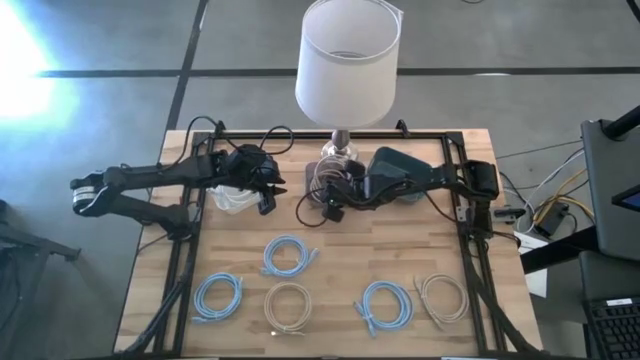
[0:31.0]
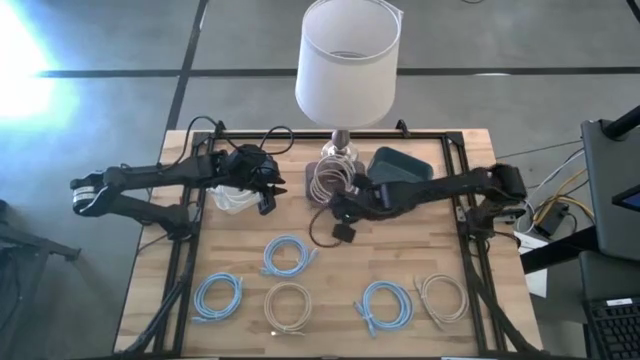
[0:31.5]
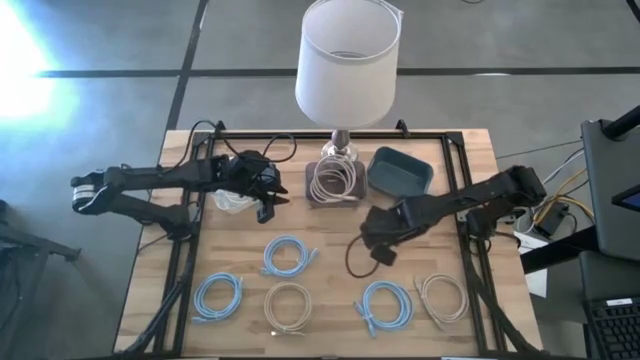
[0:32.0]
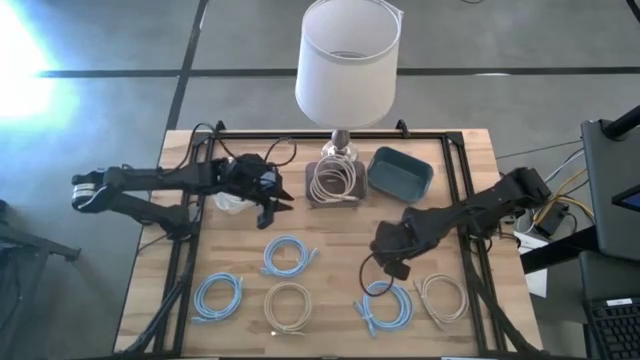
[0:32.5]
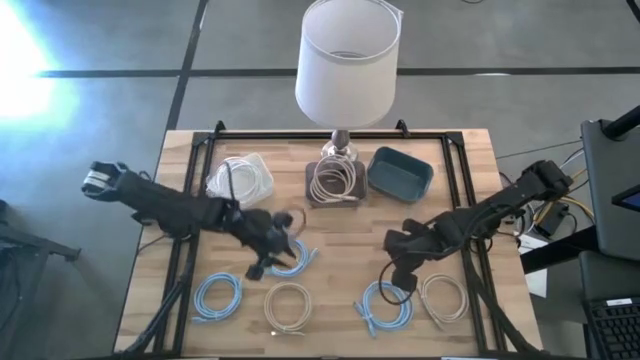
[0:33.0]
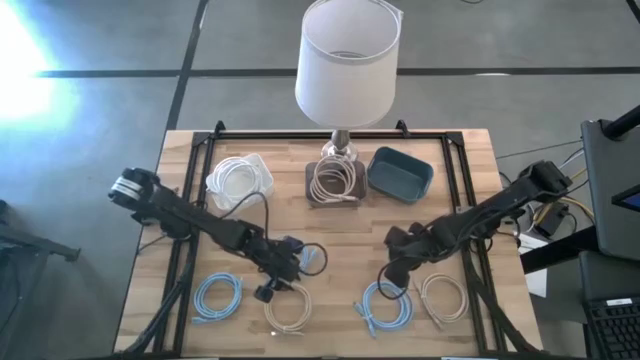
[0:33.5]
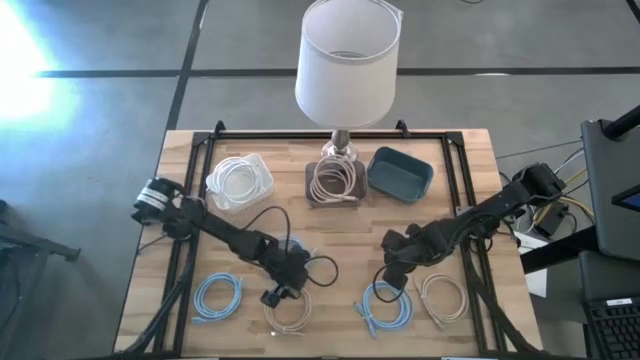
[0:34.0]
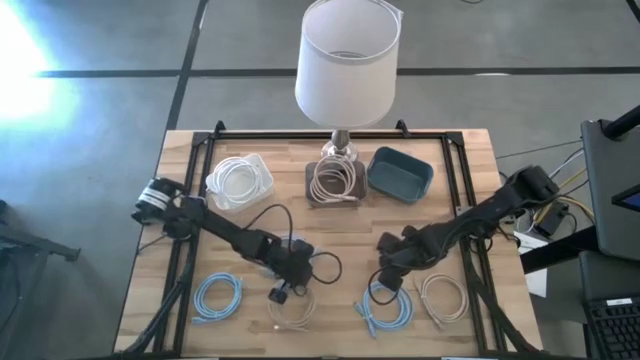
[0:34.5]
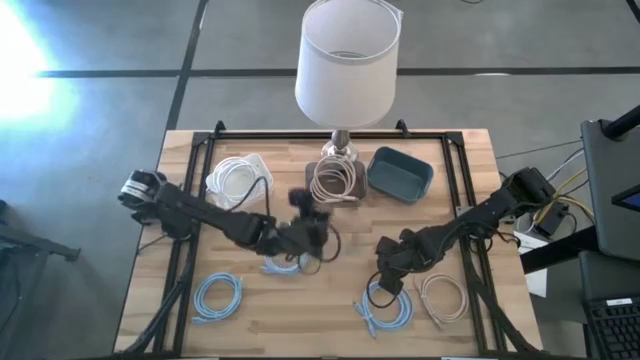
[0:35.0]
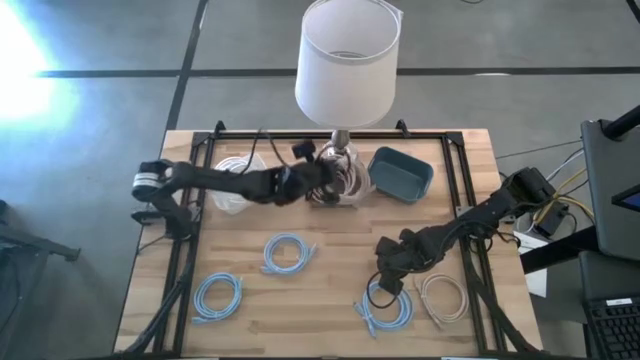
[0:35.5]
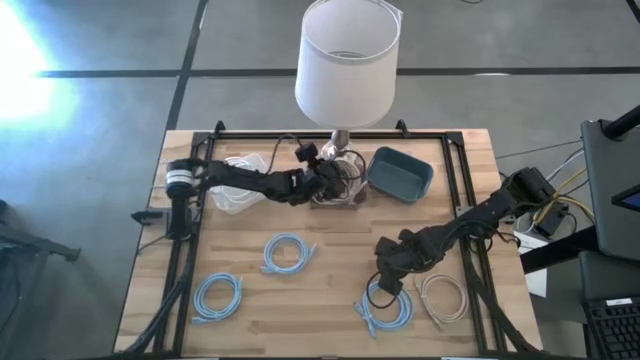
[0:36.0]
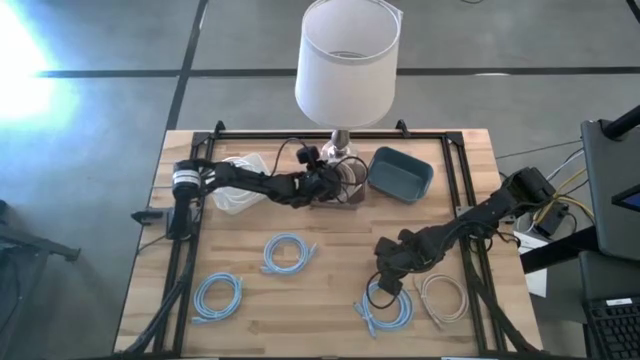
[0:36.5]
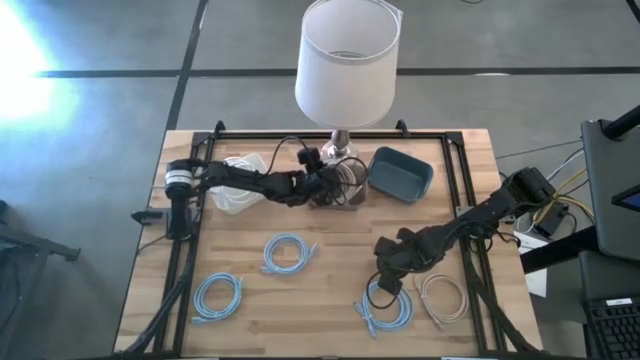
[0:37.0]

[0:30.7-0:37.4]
Task: Sort HDMI cables
Put the left brown HDMI cable into the black bin

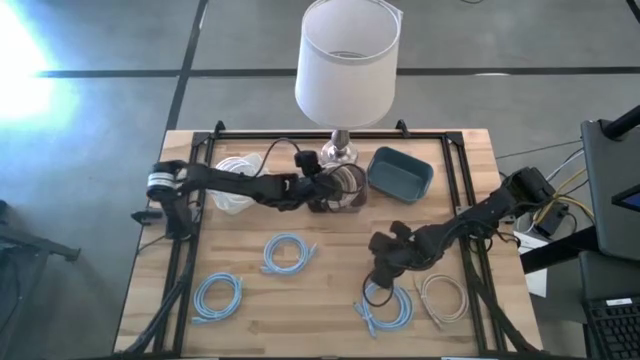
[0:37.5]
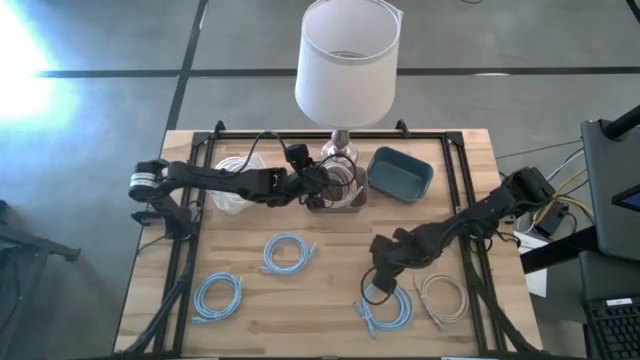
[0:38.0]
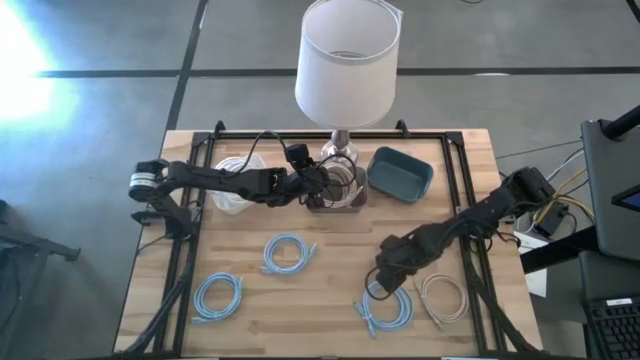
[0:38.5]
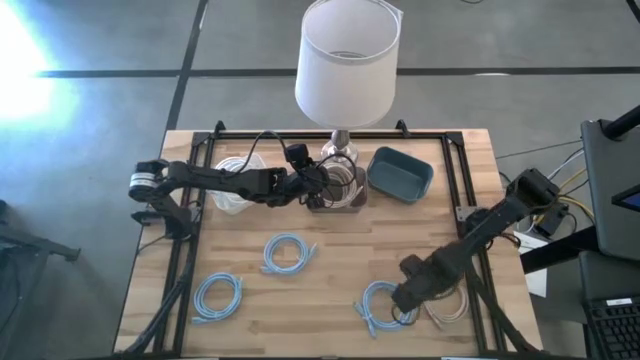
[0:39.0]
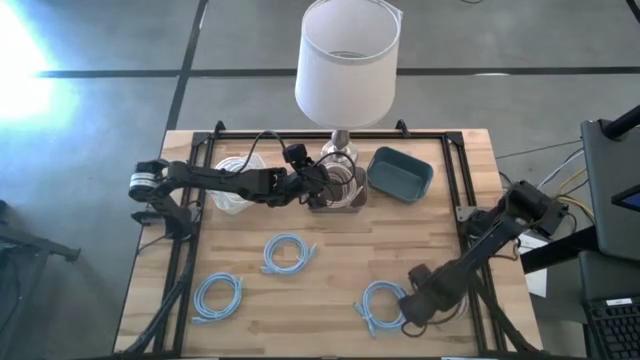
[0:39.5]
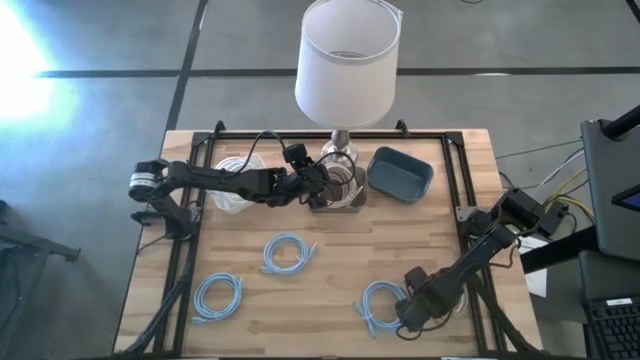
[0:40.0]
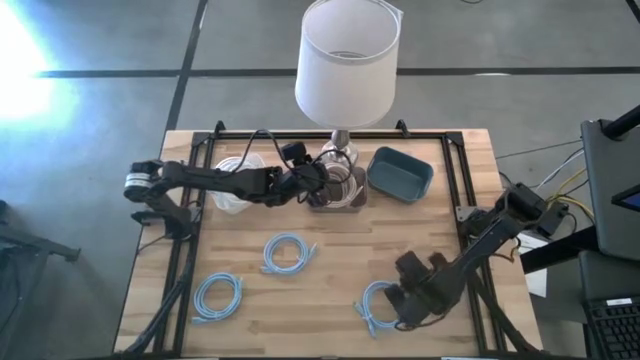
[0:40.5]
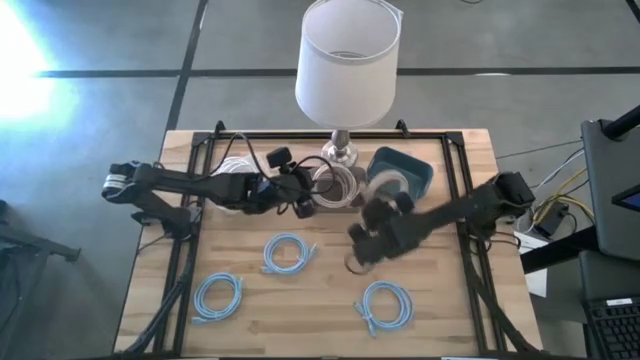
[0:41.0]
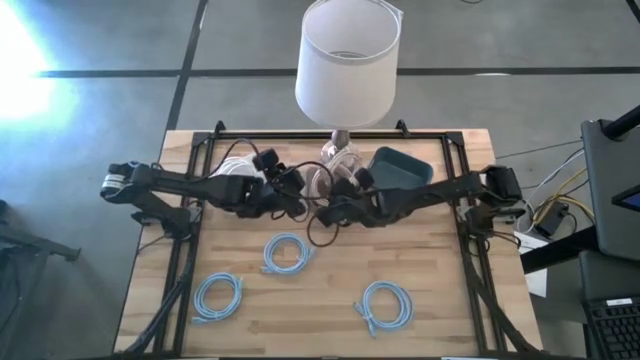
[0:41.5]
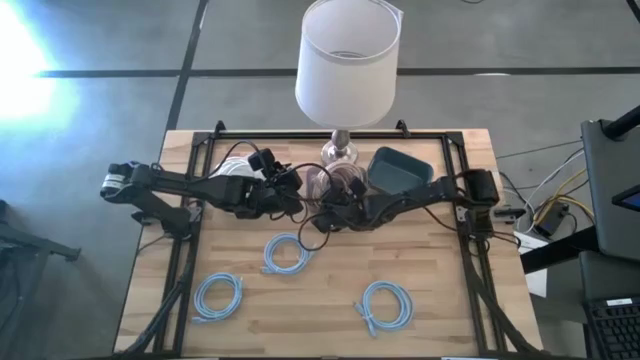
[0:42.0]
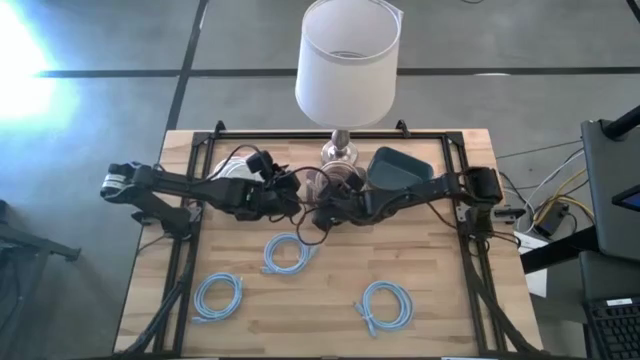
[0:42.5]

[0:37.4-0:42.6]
Put the brown HDMI cable into the black bin

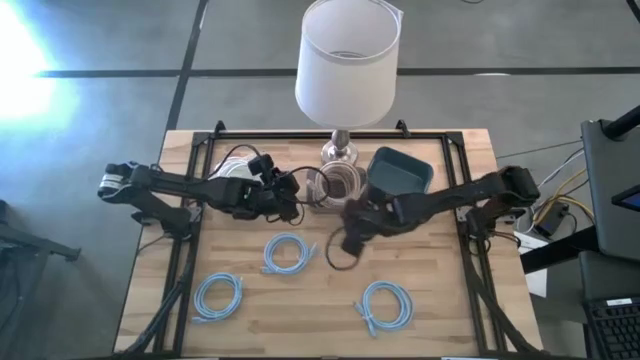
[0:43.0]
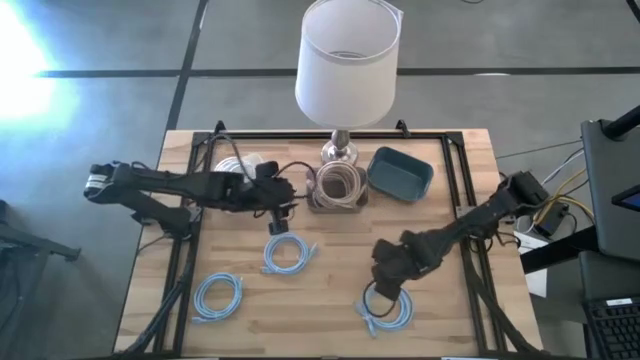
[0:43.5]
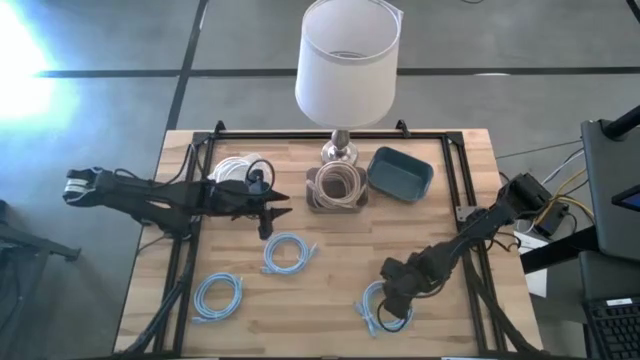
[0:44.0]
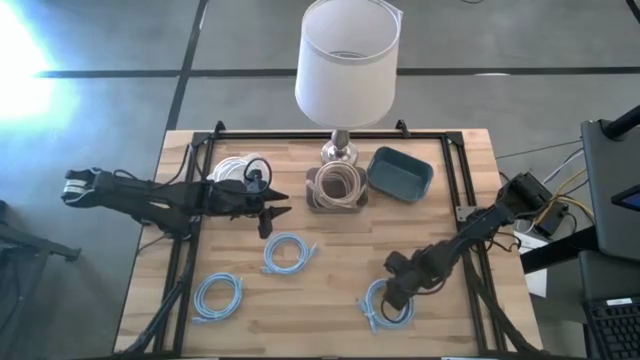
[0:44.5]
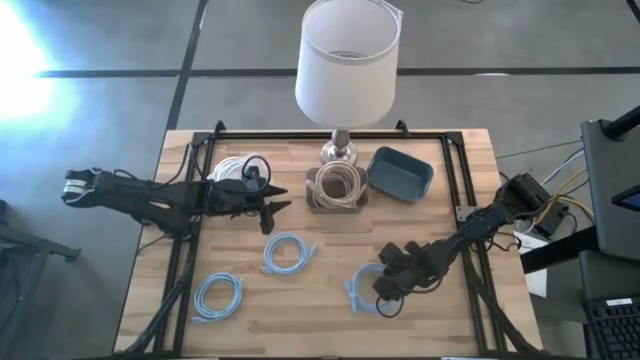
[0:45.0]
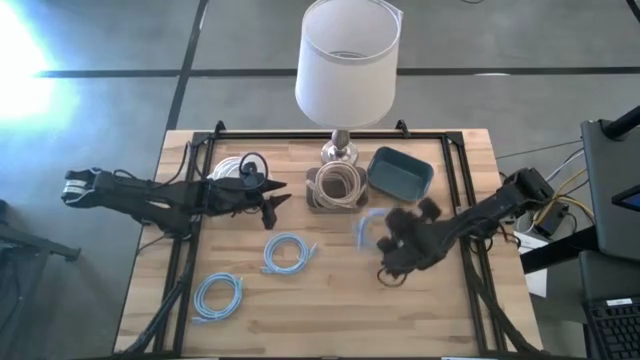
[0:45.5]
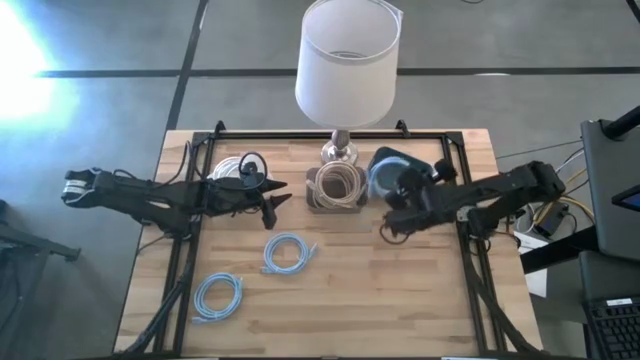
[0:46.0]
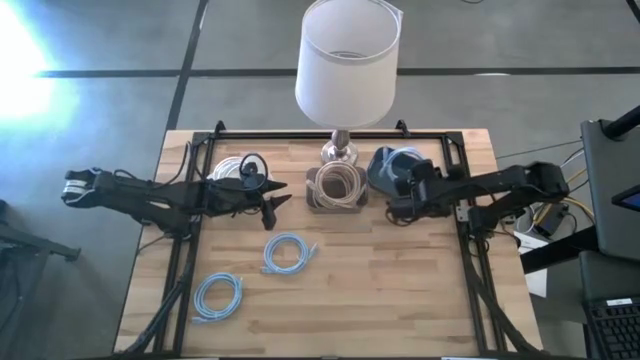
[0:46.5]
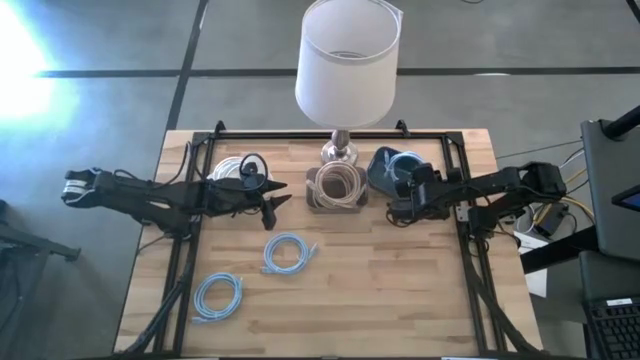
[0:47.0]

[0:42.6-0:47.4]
Put the bottom right blue HDMI cable into the blue bin

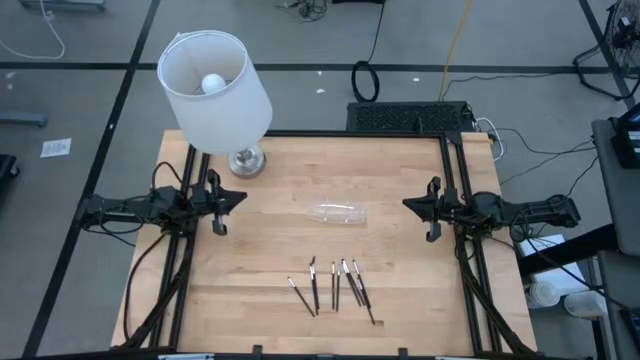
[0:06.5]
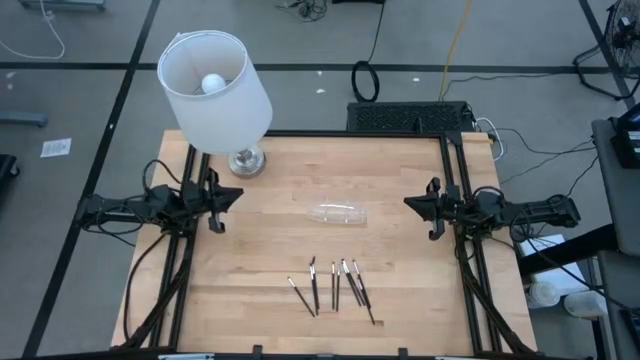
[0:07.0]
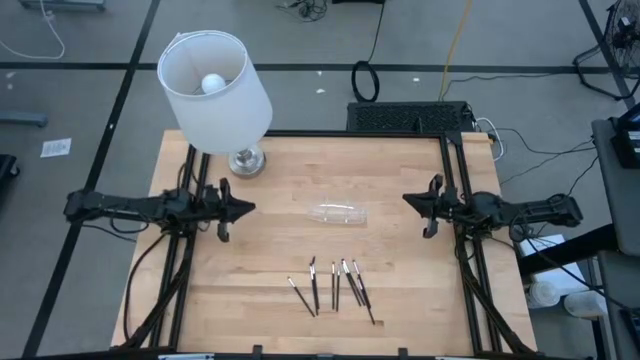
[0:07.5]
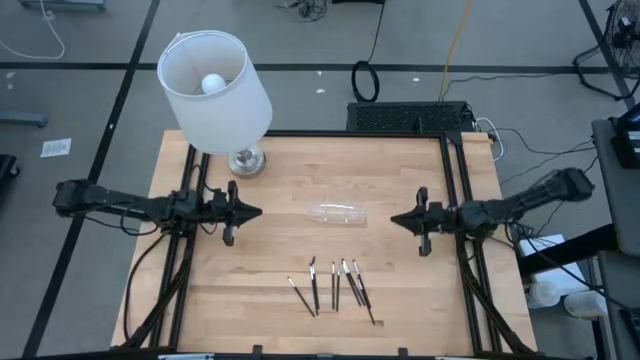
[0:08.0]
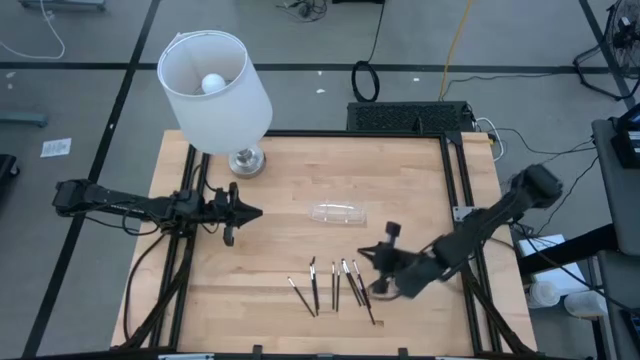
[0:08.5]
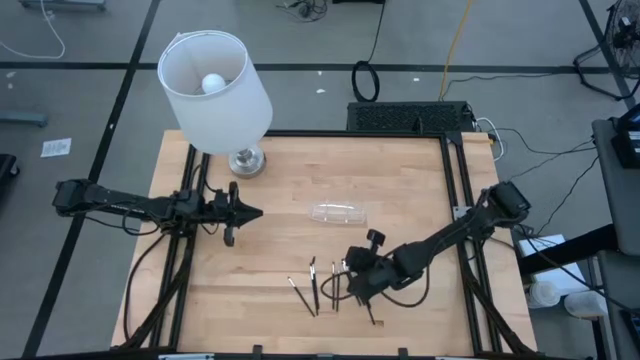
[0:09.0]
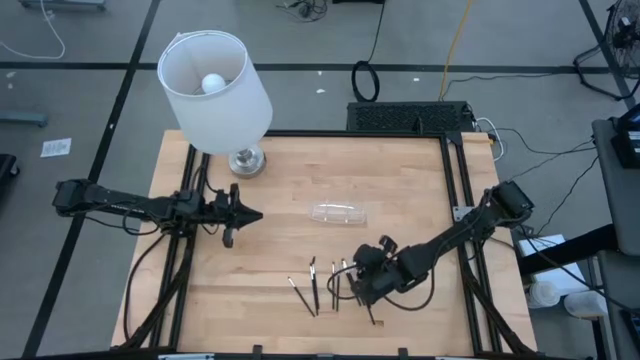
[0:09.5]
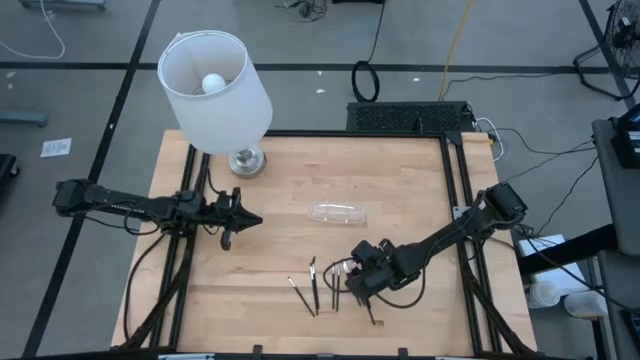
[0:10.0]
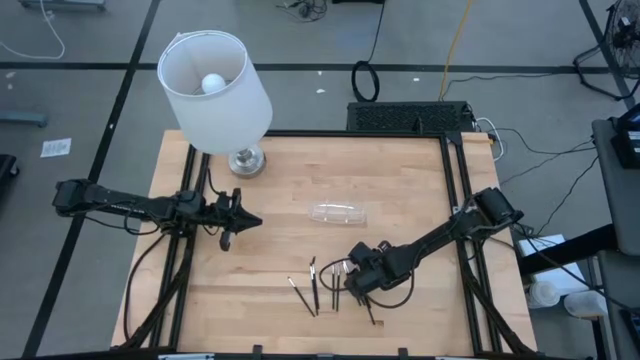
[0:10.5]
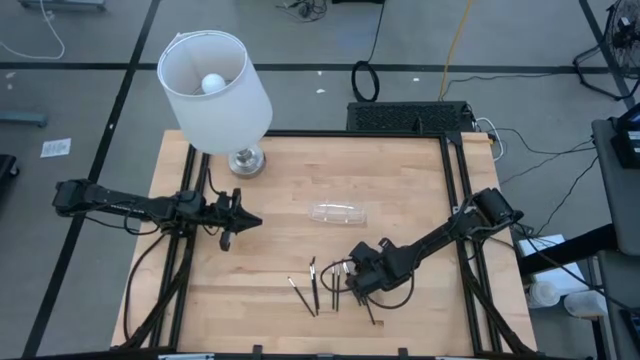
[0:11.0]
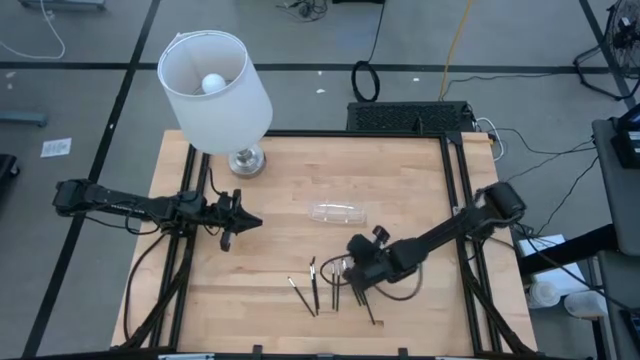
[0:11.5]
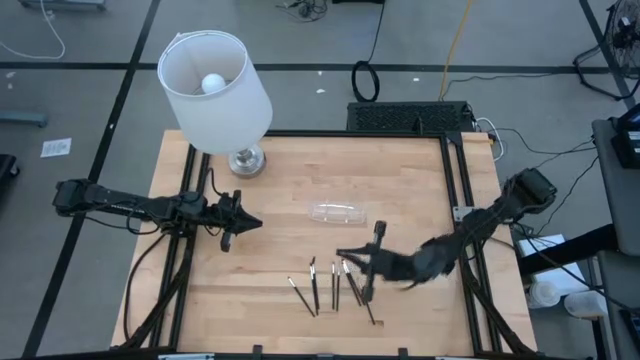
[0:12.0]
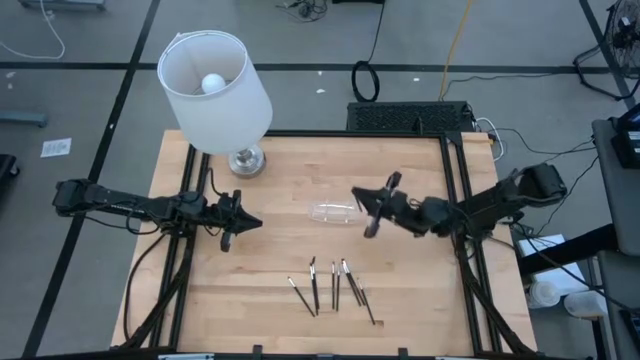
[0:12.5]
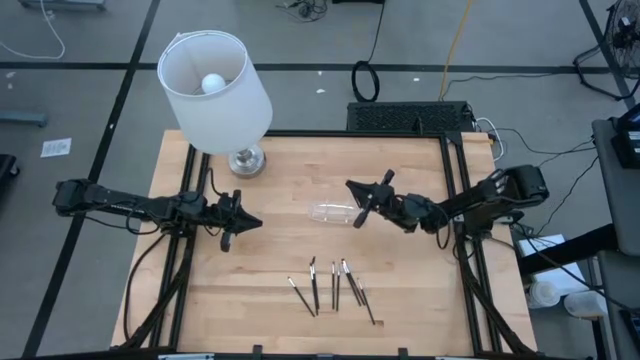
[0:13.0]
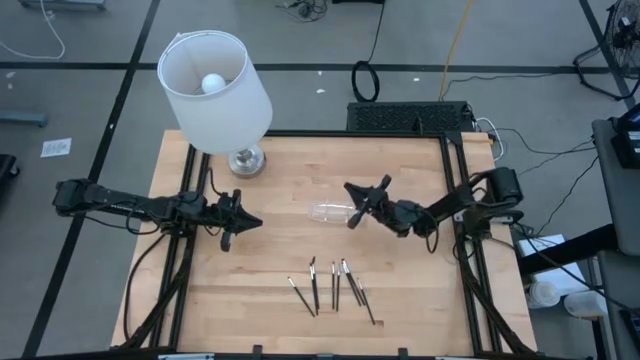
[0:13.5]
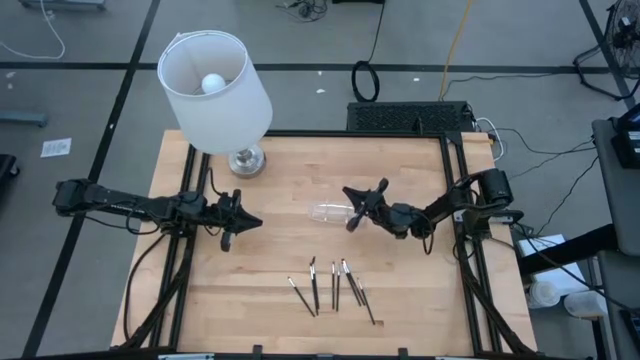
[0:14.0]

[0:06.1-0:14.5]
Task: Put items in baskets/containers
Put the eyeshadow brush into the transparent organizer
